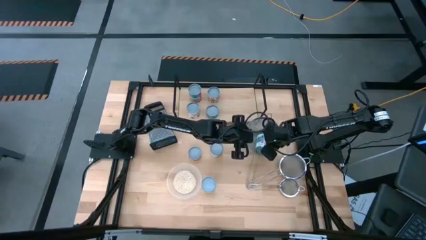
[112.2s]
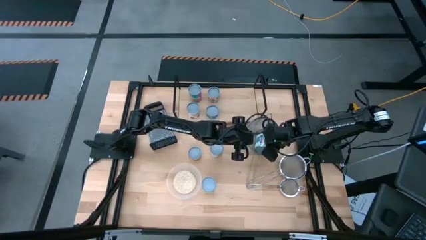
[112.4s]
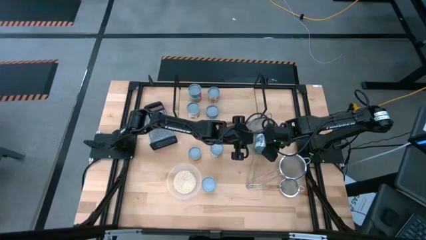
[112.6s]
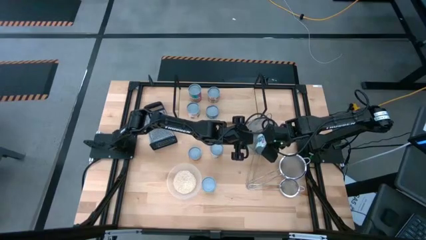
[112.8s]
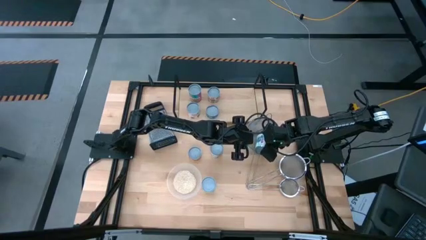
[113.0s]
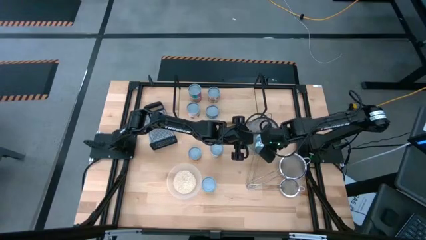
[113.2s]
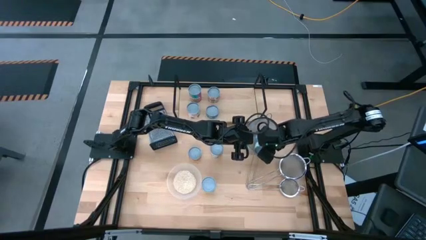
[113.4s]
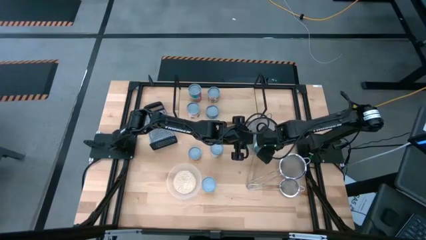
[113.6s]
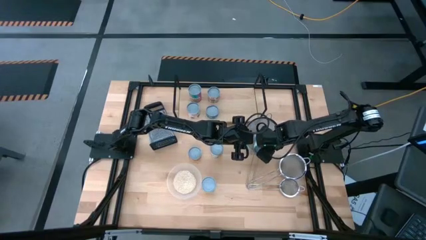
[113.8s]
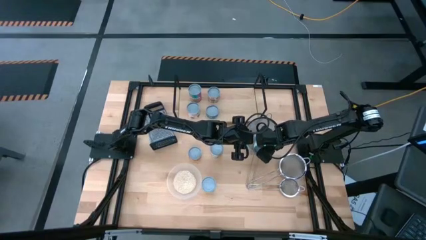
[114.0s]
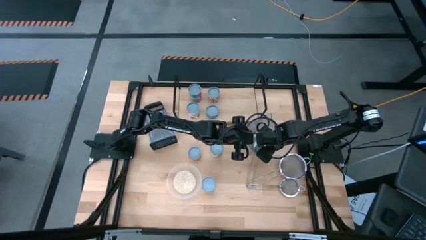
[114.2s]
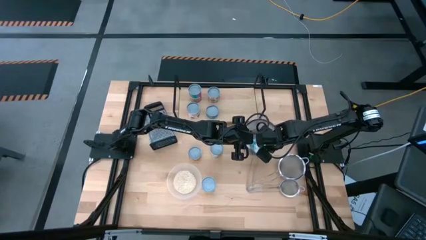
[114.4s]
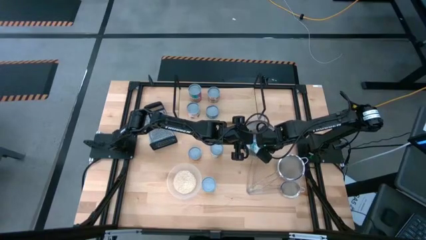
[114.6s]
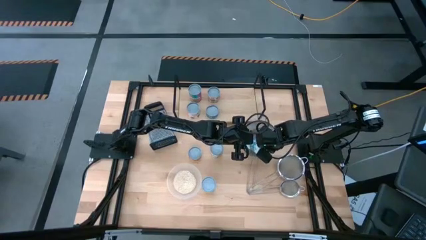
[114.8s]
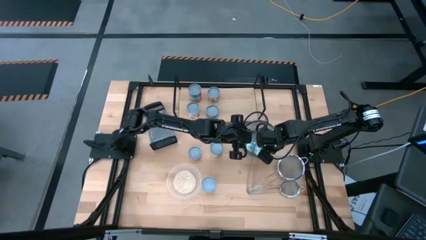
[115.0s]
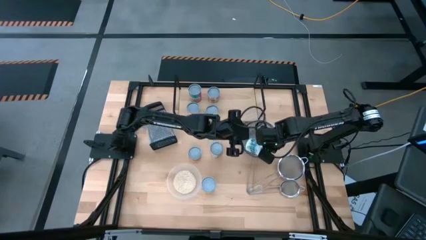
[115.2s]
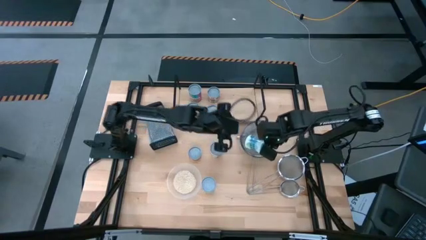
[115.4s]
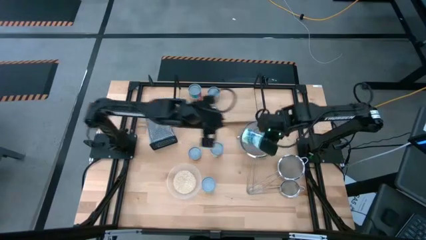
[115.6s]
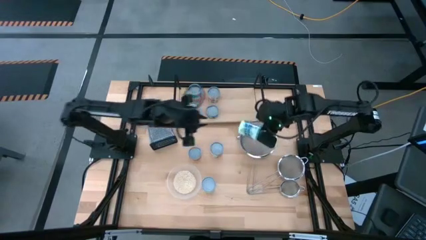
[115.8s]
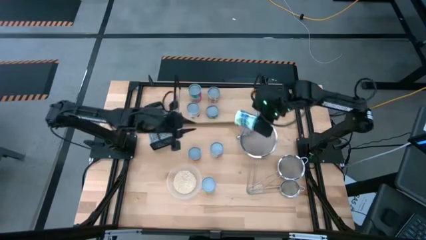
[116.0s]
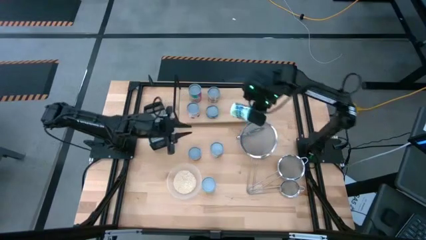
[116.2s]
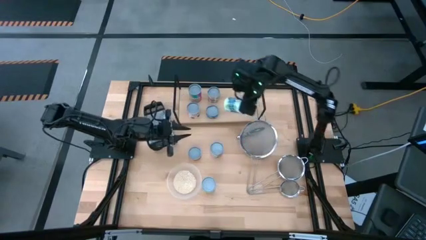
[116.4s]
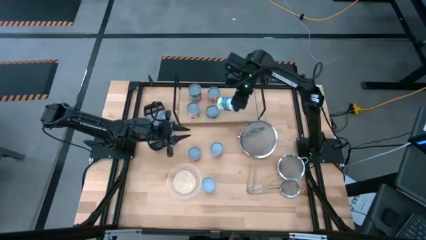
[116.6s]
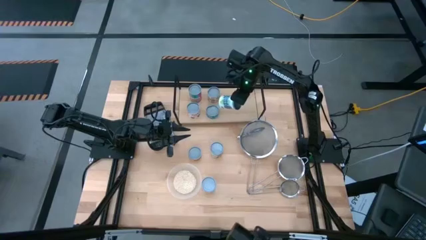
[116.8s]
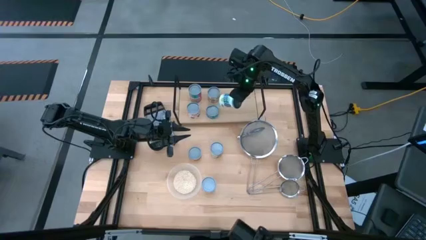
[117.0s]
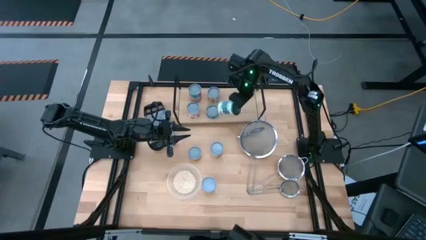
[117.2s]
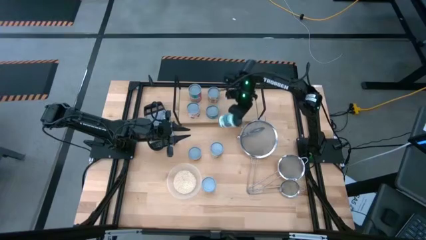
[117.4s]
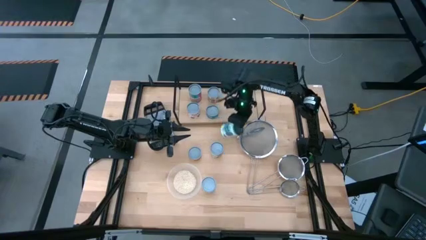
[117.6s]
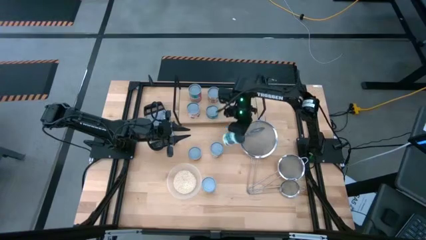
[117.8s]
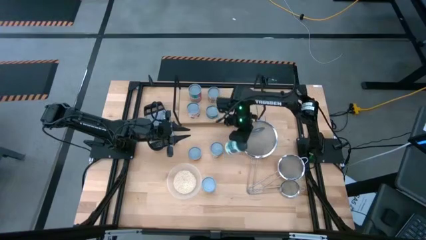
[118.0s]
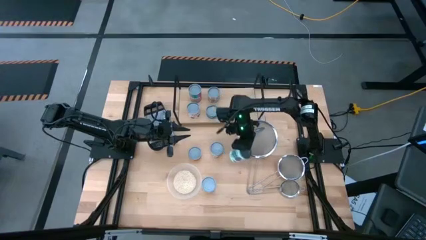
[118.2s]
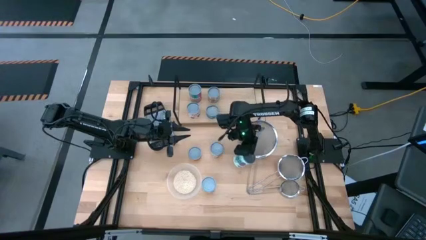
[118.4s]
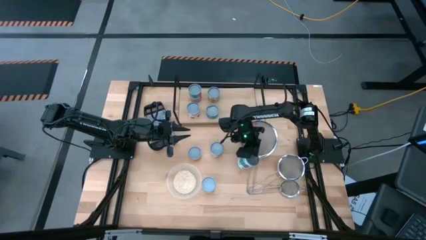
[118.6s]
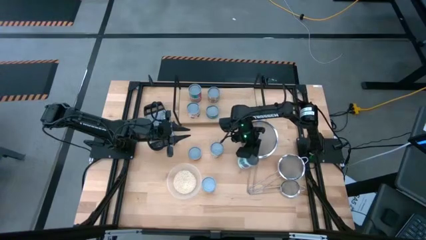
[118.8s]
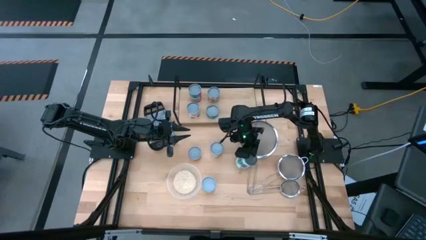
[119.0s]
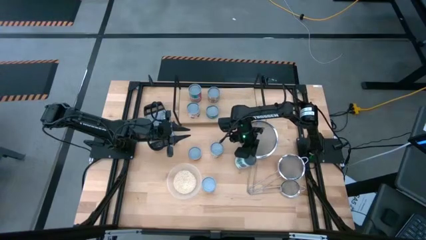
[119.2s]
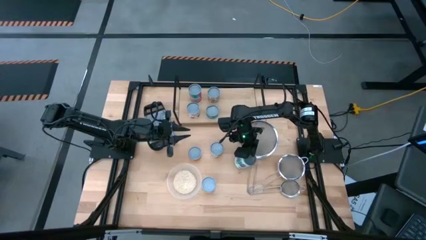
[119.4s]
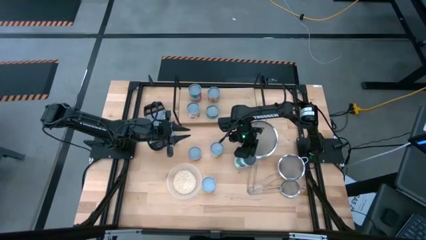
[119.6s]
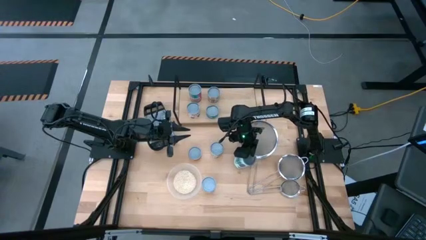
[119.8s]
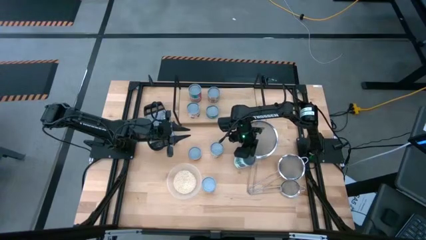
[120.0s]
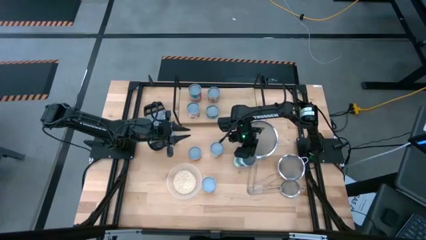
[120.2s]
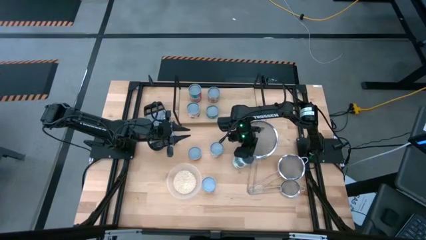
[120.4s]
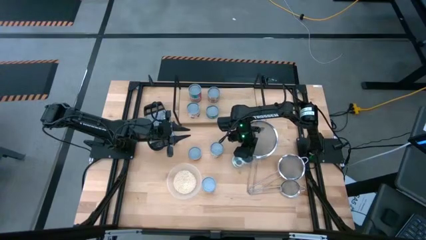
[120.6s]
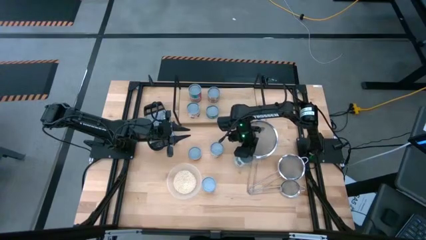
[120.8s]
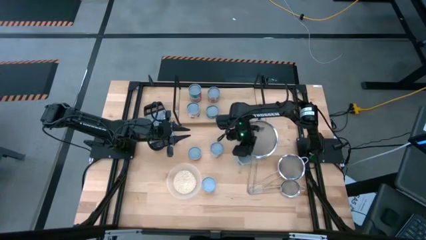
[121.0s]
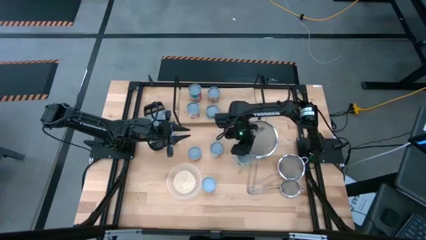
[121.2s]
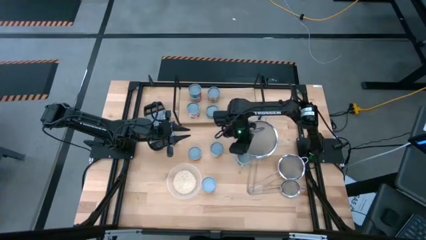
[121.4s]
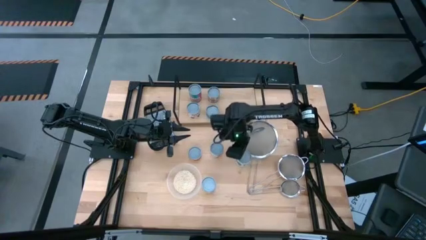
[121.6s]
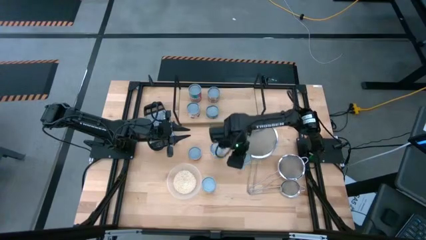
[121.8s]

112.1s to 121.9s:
Task: Pick and place cans onto a shelf
Put the white mixed vegetables can on the shelf

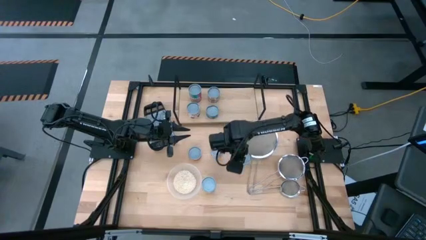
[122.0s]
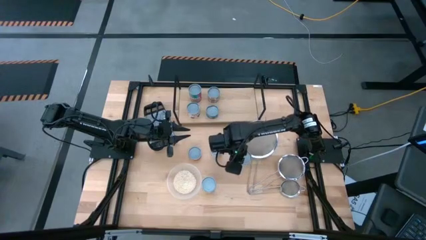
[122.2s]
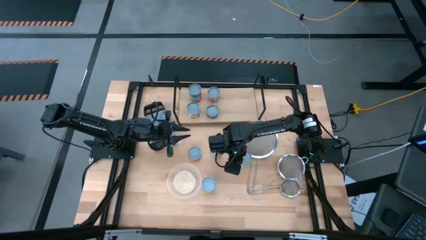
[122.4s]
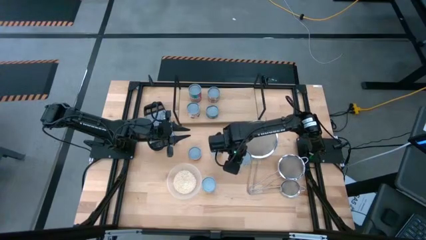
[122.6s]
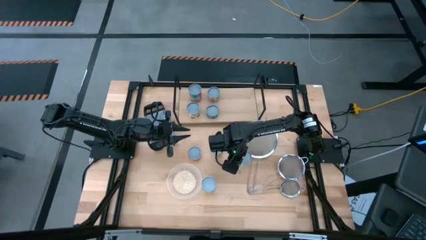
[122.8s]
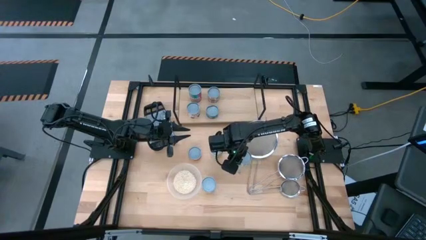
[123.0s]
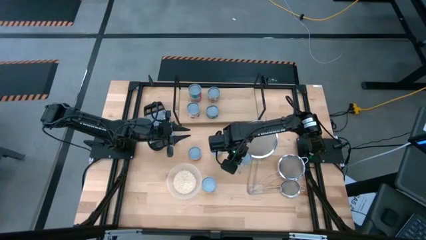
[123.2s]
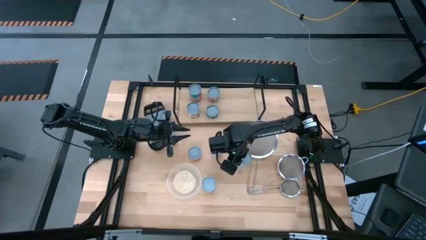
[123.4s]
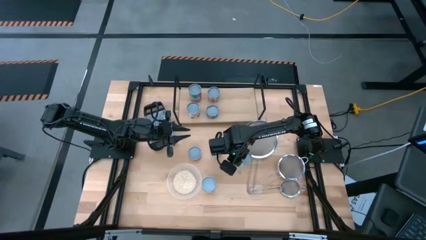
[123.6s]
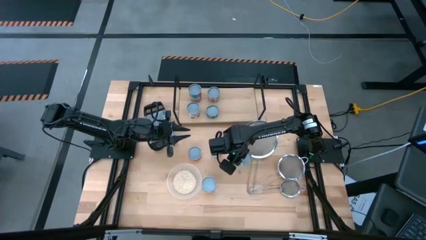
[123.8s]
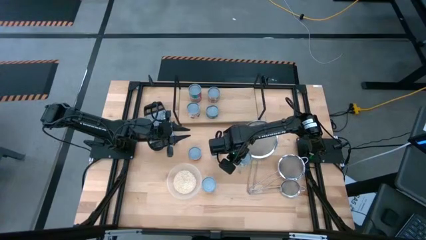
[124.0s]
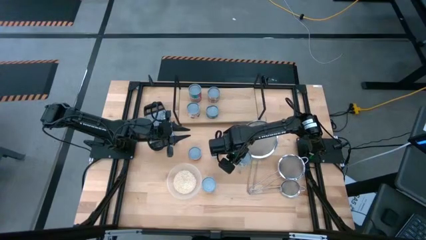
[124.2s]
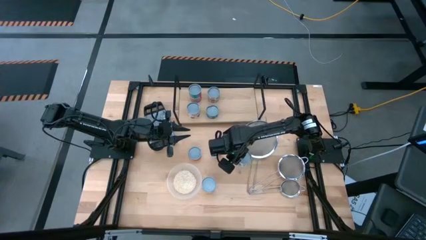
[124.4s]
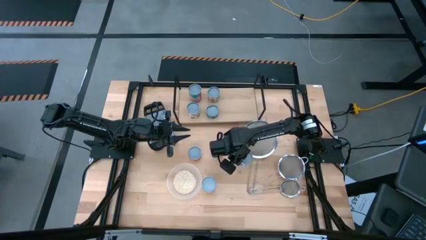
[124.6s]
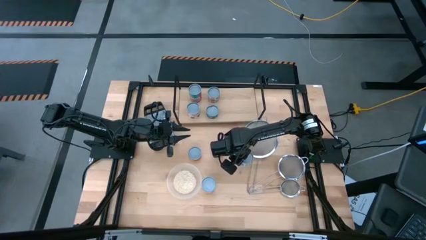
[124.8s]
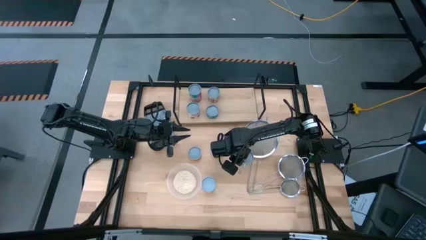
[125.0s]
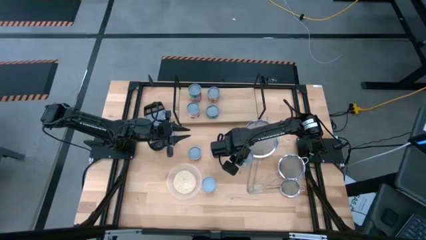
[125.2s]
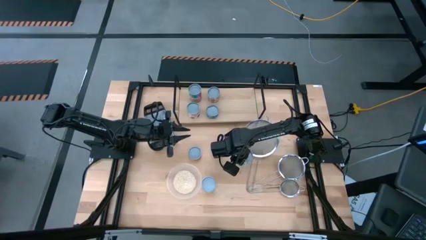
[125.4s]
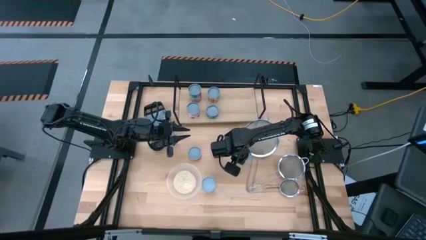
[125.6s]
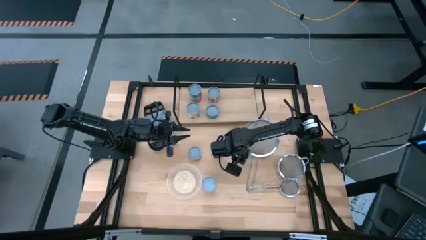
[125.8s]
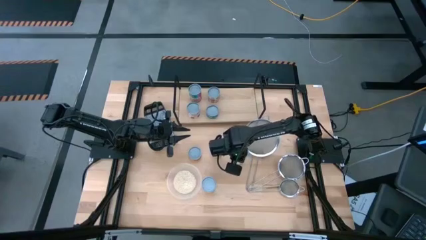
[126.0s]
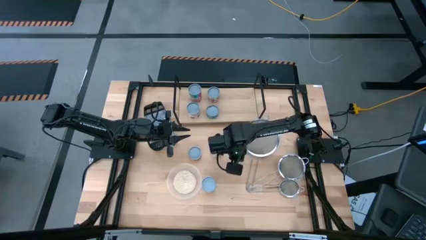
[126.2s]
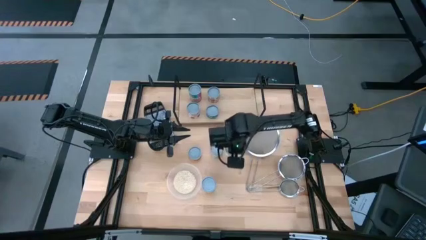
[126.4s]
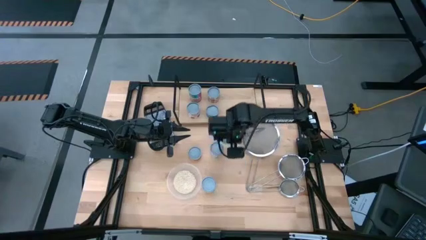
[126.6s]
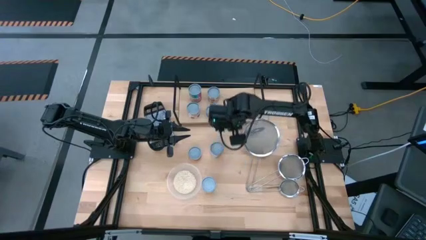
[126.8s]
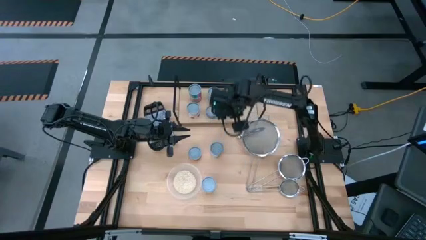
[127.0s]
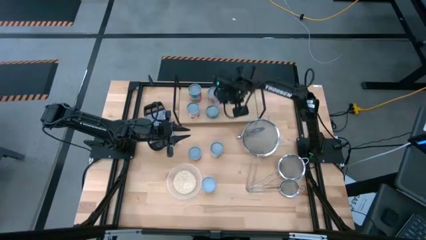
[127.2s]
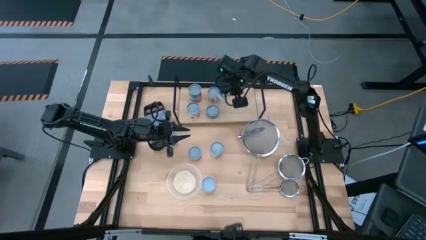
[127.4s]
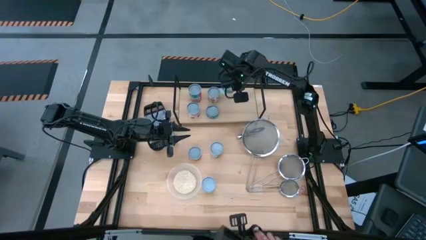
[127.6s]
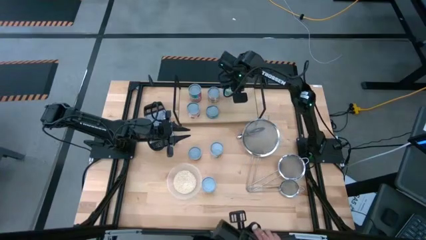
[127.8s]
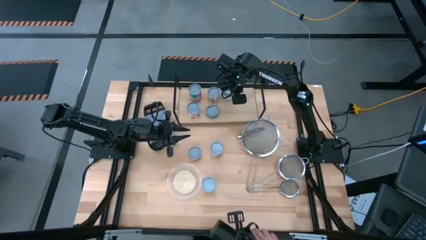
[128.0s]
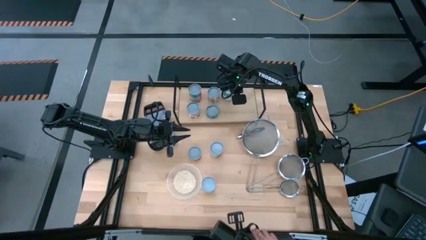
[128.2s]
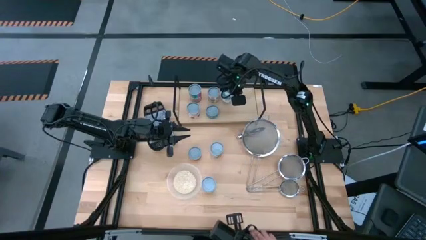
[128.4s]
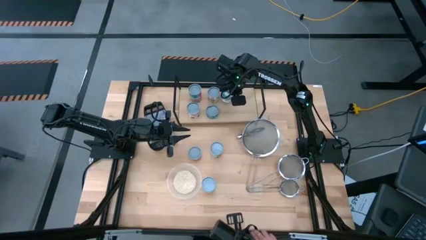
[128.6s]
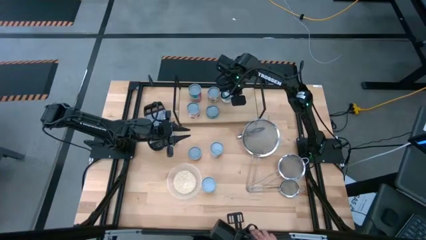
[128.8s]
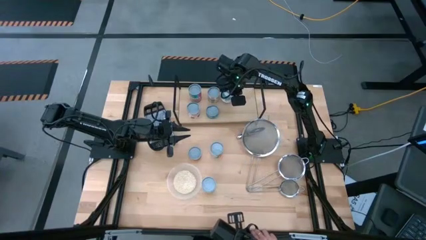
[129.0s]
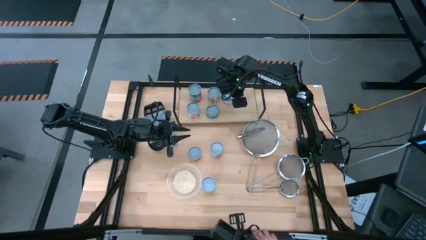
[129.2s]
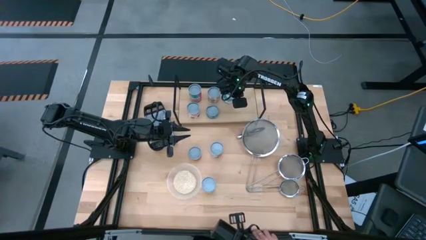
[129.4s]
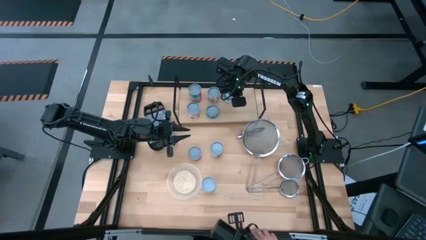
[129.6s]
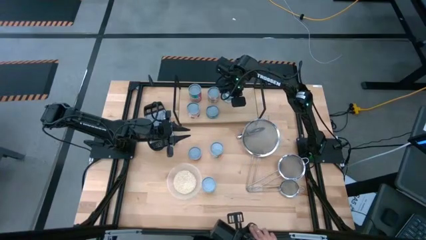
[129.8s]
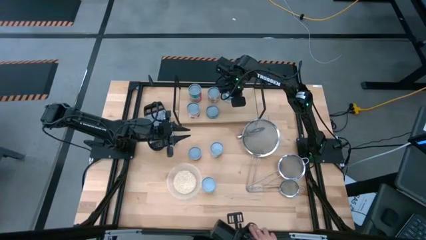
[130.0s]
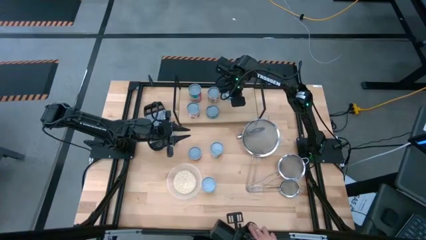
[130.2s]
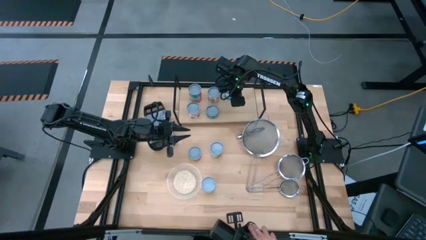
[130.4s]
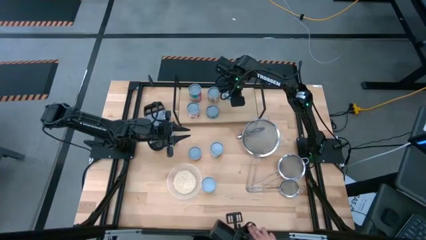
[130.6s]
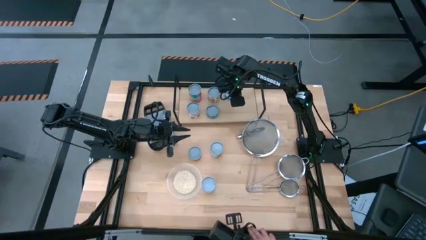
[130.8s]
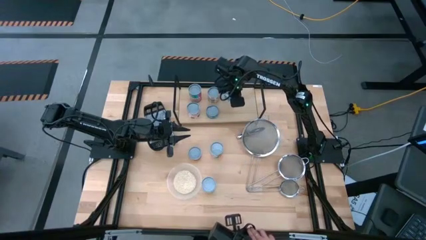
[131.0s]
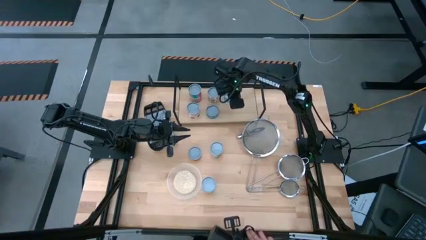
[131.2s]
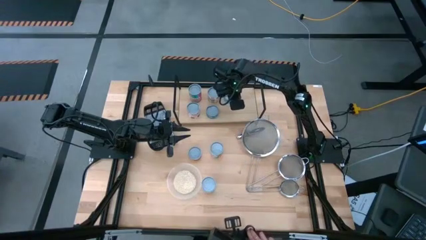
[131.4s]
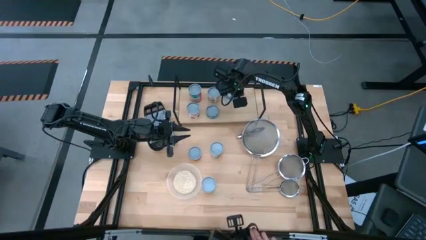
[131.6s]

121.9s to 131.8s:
Put the white mixed vegetables can on the shelf
